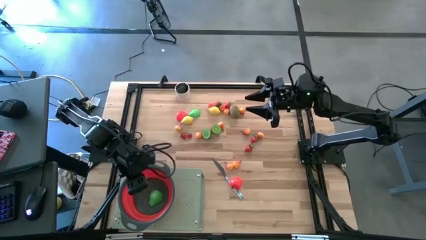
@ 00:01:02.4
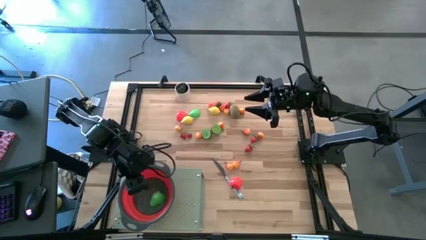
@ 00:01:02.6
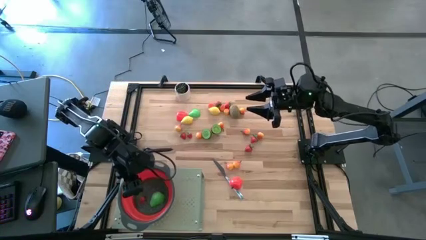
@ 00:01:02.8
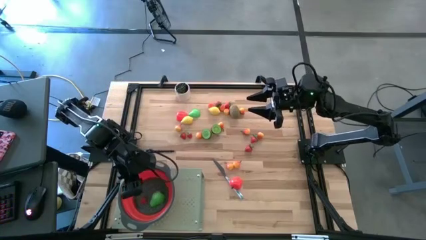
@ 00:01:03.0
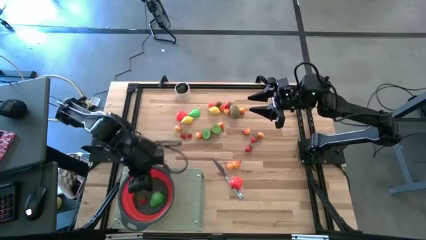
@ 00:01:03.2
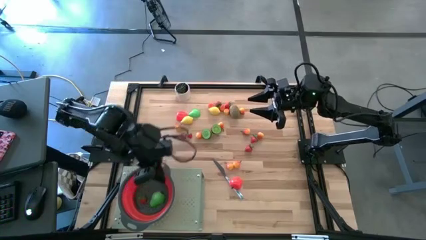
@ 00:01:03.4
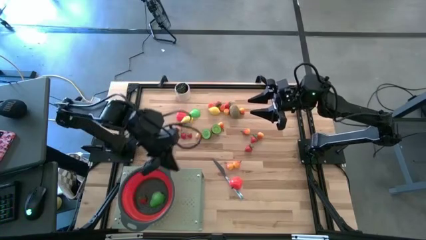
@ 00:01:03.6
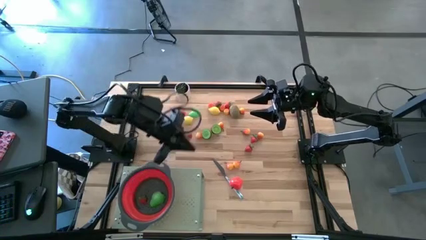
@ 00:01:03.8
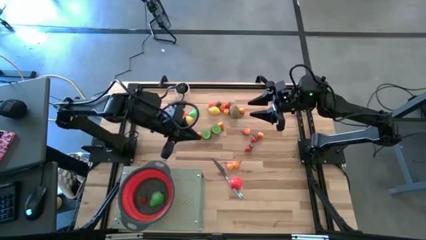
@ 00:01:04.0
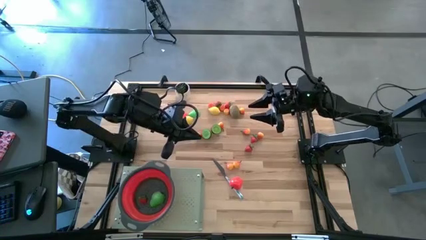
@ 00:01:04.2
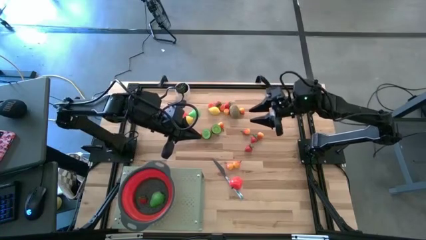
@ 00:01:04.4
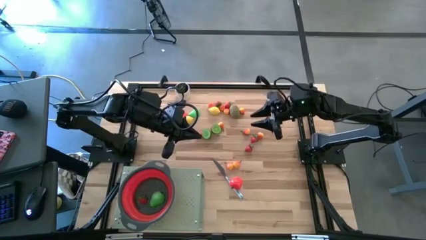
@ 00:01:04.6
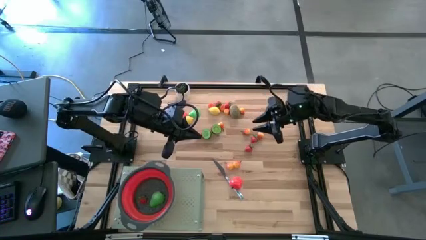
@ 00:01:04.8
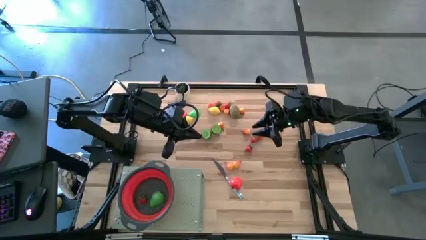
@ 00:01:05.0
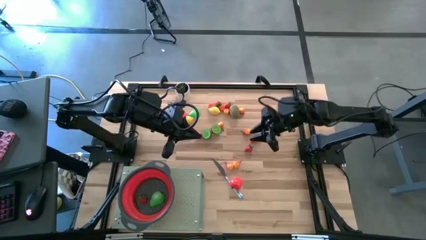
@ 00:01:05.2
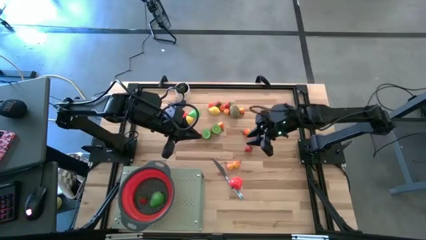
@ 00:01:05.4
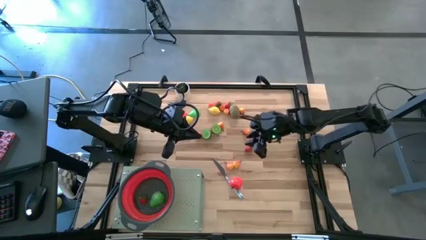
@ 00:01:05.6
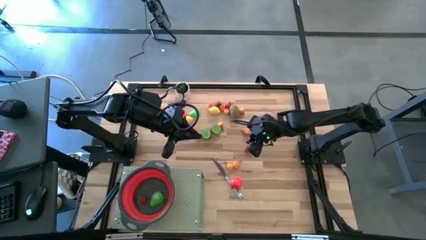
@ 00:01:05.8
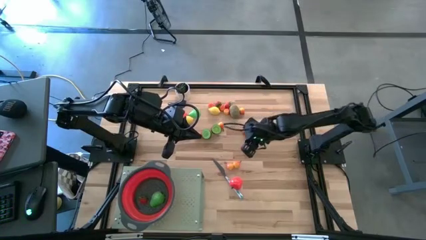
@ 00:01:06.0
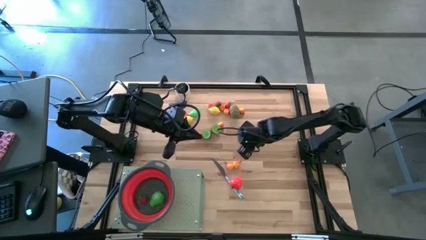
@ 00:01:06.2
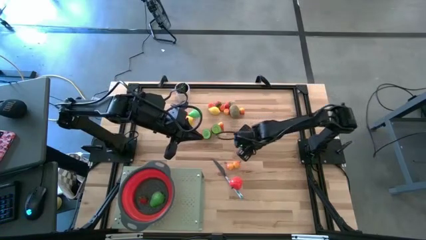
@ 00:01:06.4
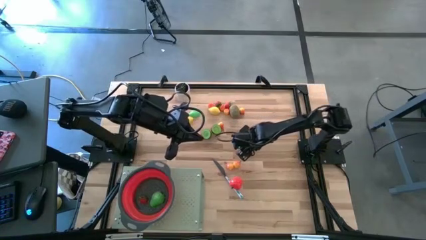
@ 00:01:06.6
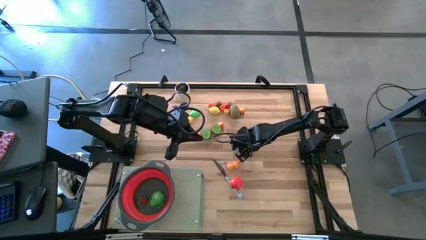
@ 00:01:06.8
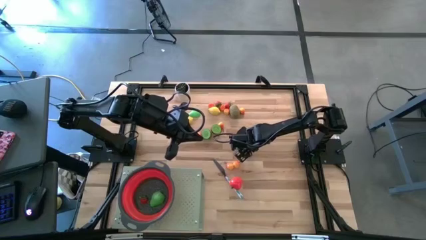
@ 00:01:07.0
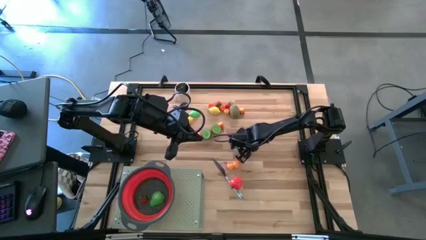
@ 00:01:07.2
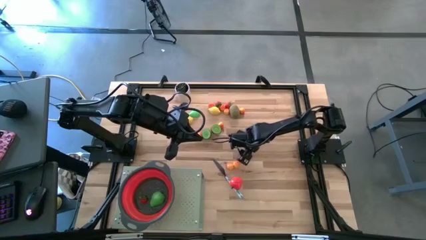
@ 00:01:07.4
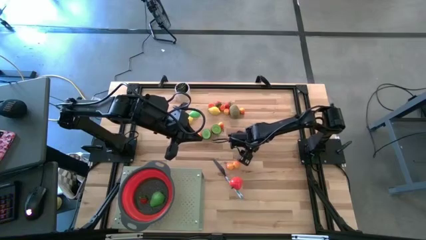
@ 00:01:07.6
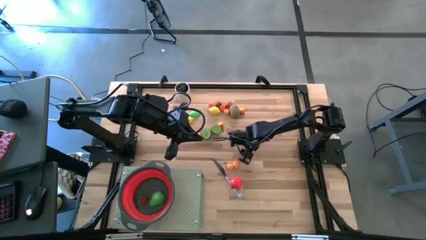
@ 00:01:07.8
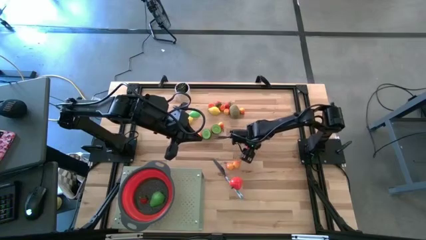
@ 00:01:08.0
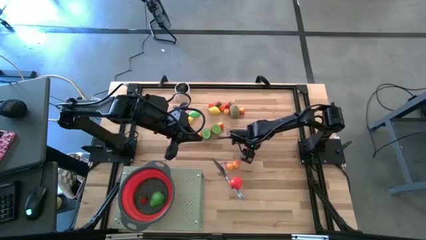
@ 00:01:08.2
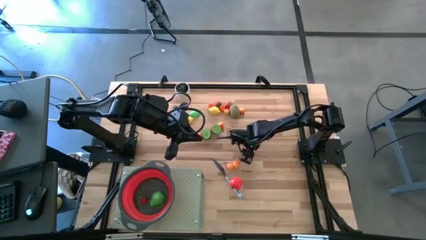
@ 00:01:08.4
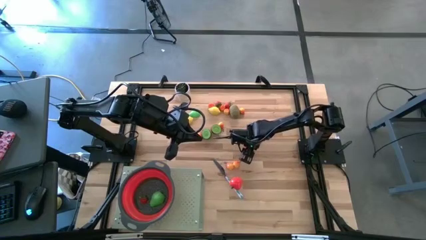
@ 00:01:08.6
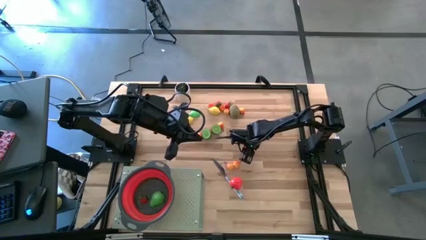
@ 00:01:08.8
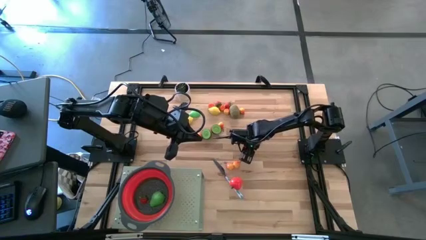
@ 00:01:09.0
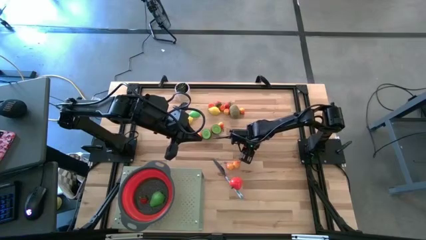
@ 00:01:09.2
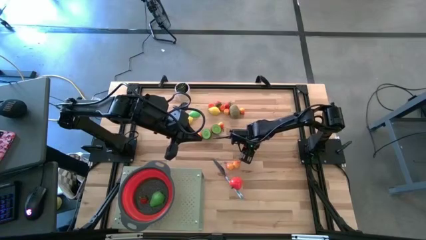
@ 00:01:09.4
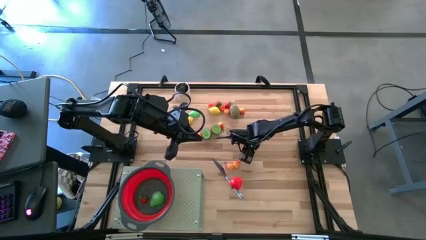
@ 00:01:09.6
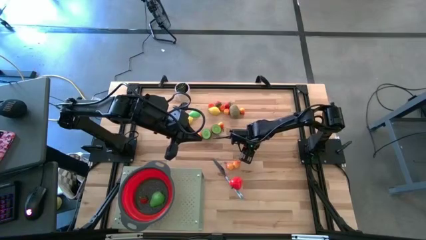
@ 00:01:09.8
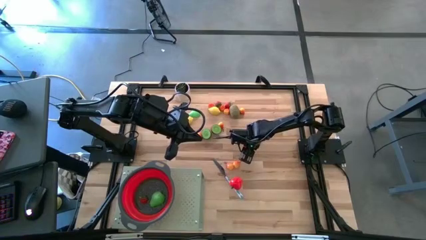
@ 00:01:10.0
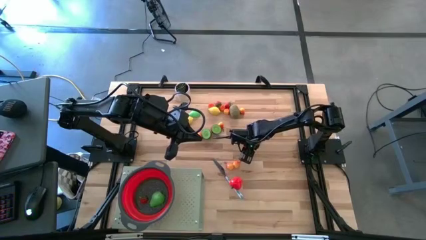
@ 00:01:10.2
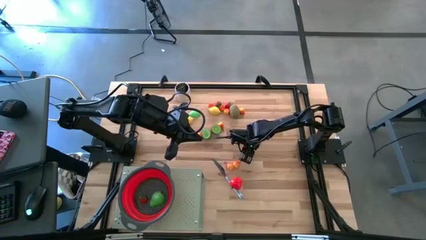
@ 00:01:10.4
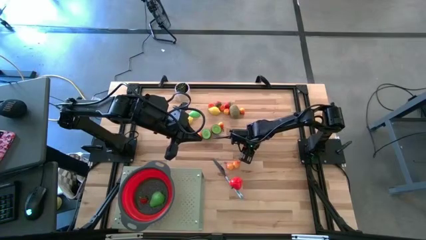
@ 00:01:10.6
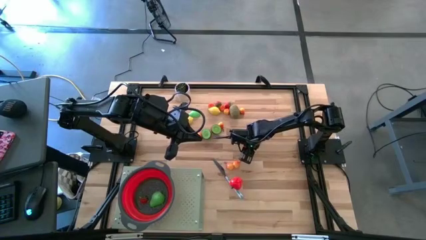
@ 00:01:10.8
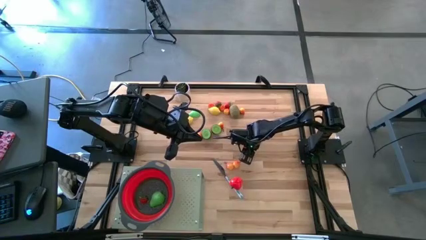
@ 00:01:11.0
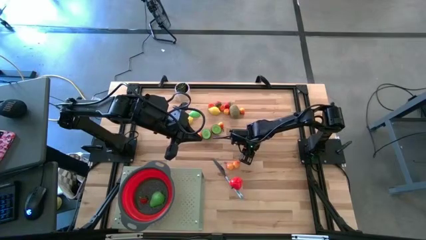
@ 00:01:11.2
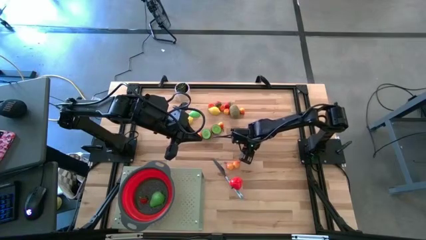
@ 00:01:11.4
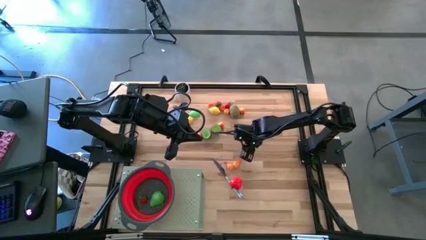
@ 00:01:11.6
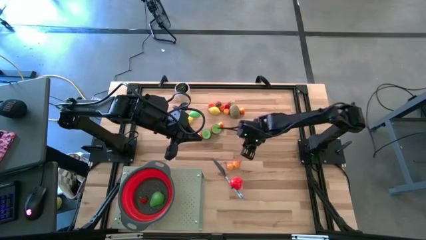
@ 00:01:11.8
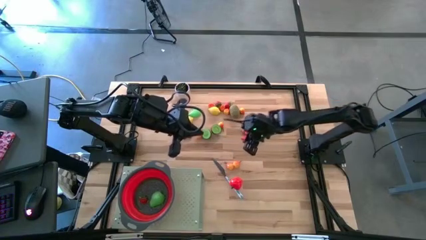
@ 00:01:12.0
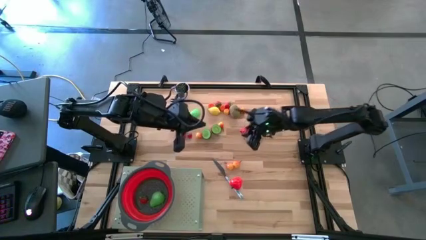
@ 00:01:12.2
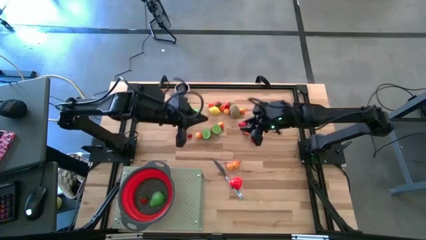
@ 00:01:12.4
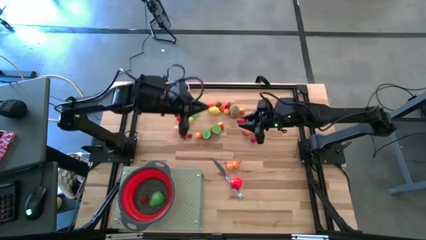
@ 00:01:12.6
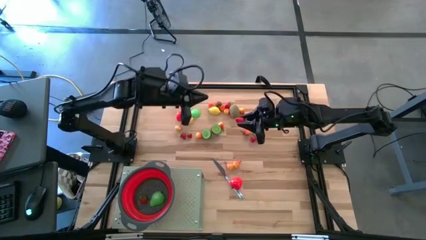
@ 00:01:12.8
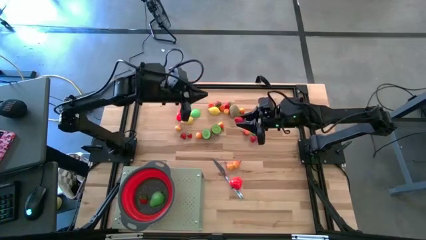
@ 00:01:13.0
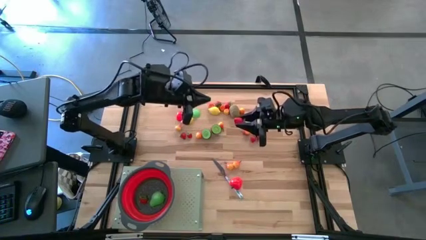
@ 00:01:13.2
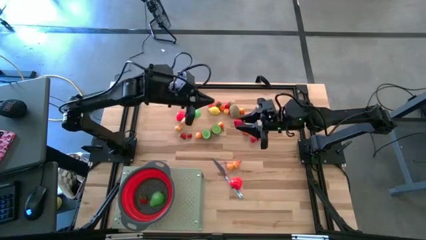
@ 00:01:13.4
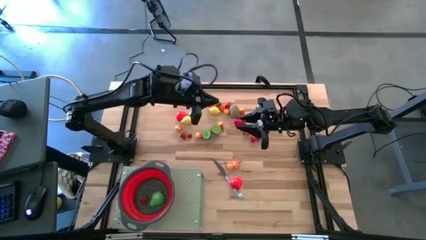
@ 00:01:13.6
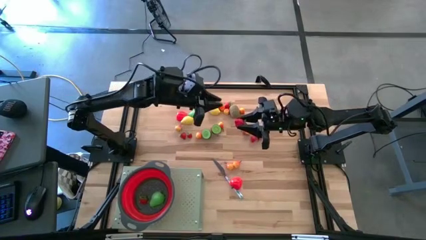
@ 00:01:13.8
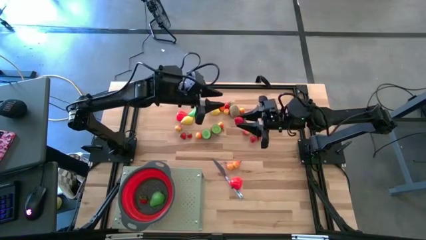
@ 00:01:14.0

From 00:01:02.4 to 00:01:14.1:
Task: Pick & Place Fruit
Put the strawberry into the red strainer bowl on the shelf

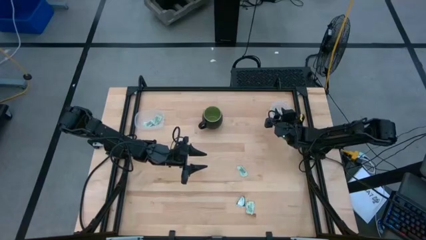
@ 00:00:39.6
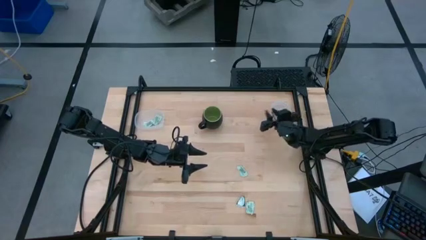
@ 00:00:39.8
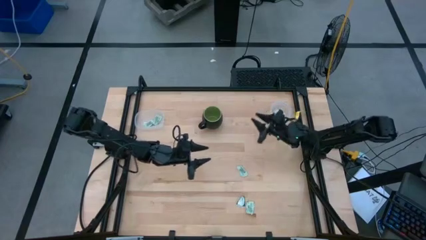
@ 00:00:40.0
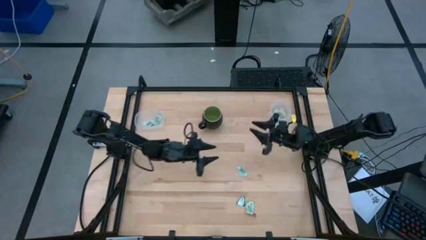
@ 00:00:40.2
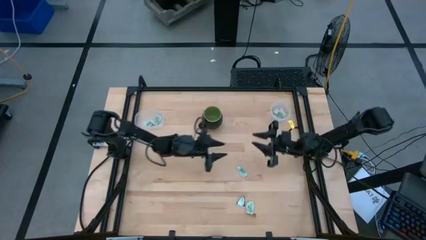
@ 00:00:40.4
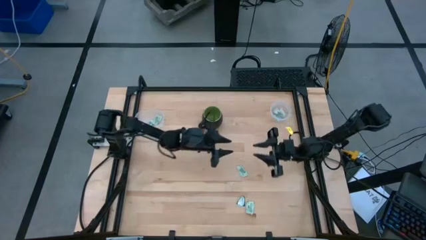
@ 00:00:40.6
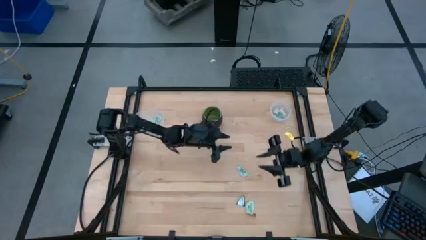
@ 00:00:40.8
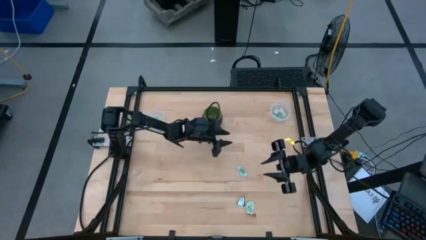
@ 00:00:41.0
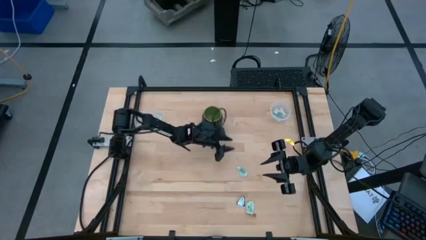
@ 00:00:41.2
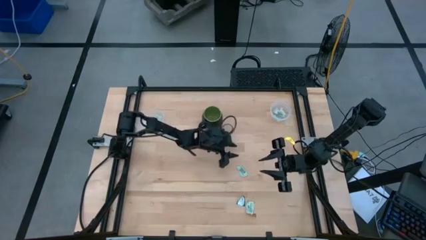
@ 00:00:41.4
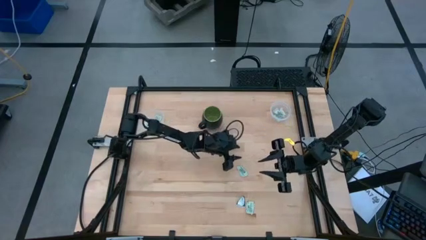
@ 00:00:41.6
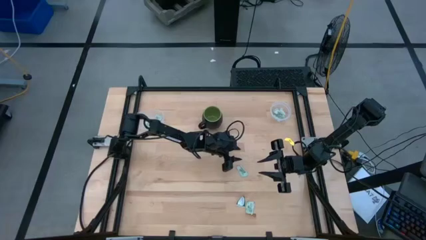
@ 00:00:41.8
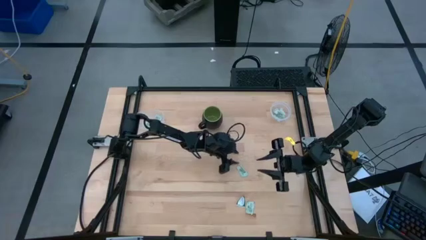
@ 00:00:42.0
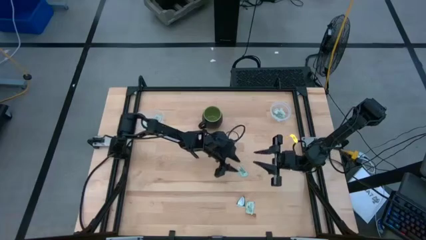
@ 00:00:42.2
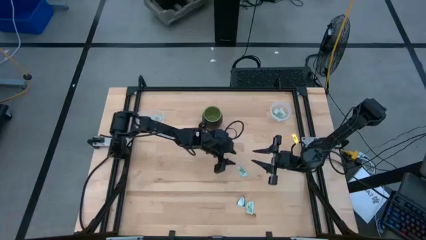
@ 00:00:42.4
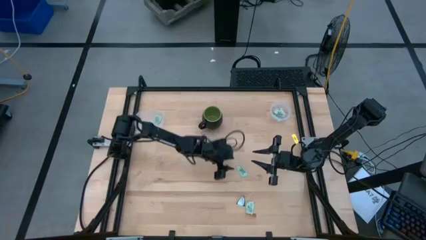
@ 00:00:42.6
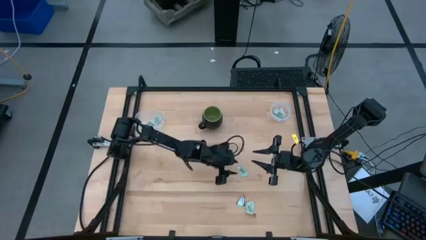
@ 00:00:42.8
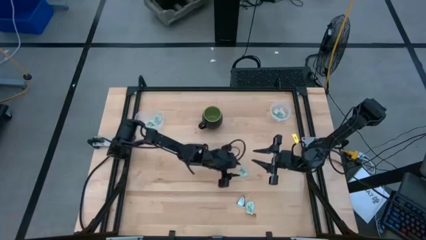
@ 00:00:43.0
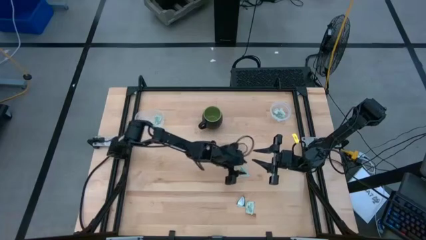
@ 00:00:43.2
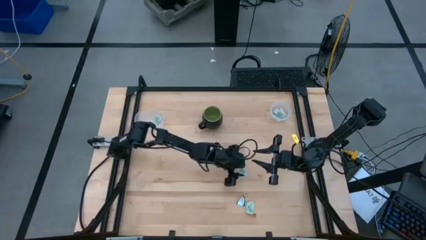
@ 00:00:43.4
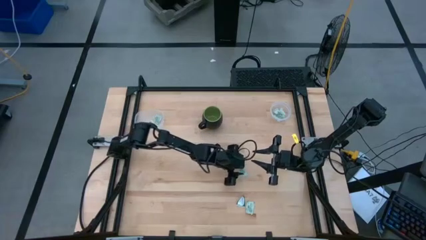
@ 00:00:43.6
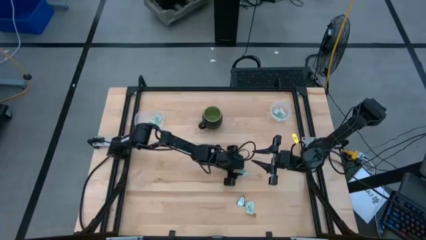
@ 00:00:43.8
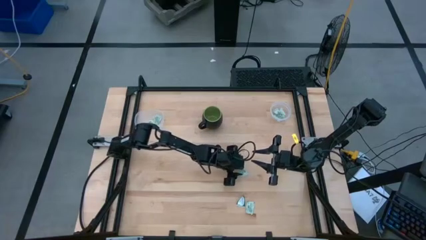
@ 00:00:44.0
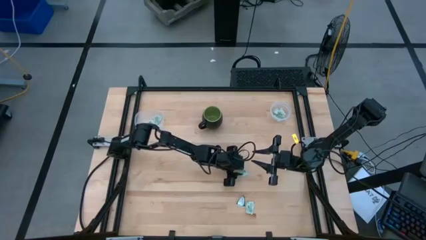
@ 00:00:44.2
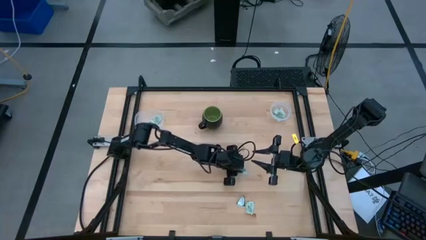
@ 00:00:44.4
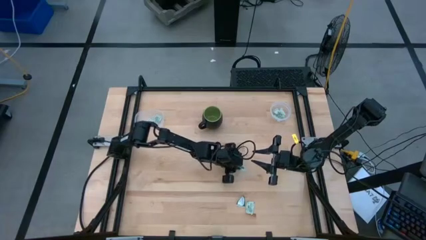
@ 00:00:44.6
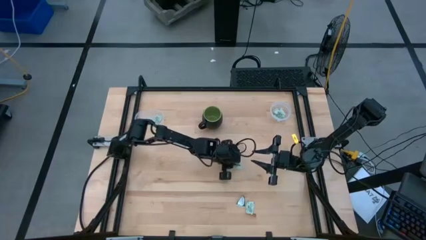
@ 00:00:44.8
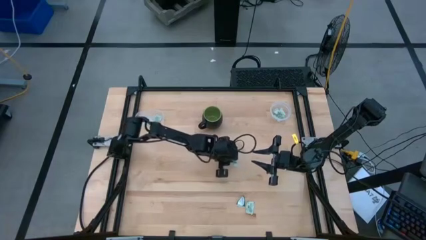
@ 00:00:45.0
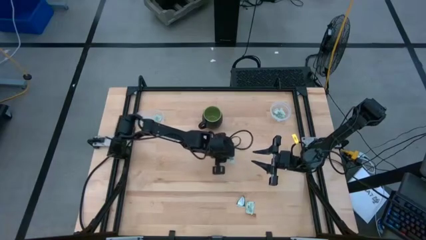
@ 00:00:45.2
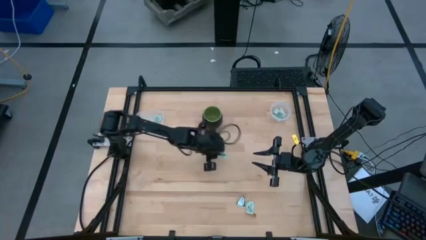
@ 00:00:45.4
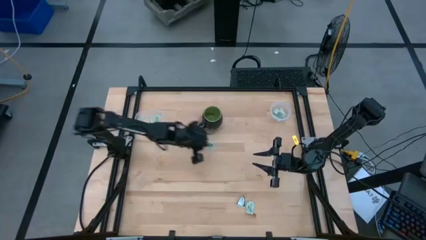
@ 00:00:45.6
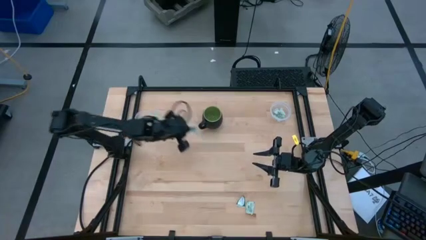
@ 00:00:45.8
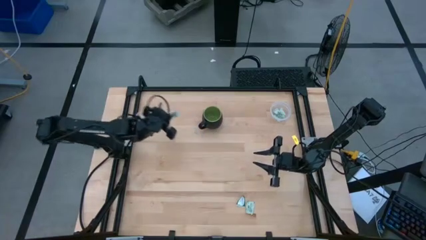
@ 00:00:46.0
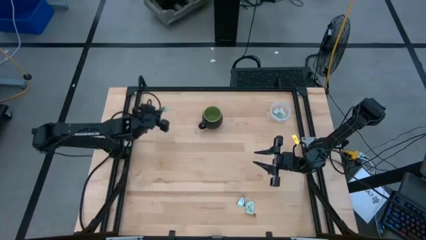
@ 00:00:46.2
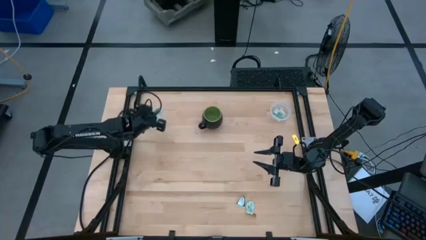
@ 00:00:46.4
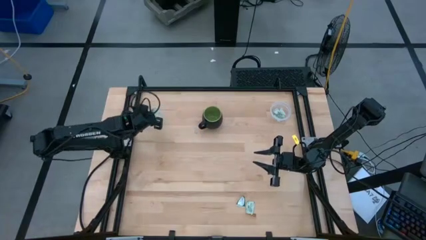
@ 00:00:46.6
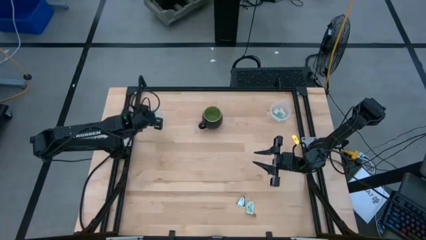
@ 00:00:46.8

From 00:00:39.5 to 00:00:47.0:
Task: Pick and place items into bin
Put the white stevia packet into the left transparent bin
